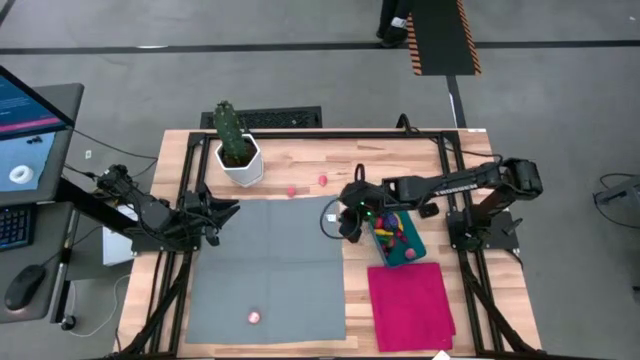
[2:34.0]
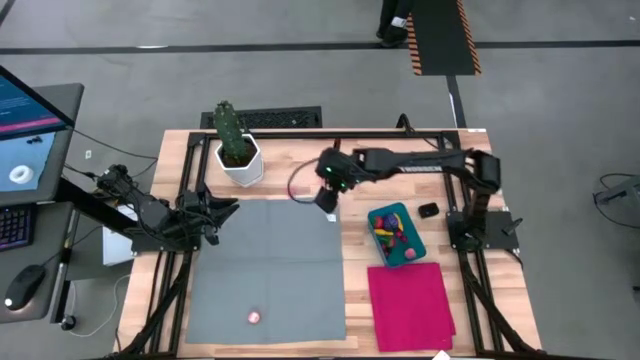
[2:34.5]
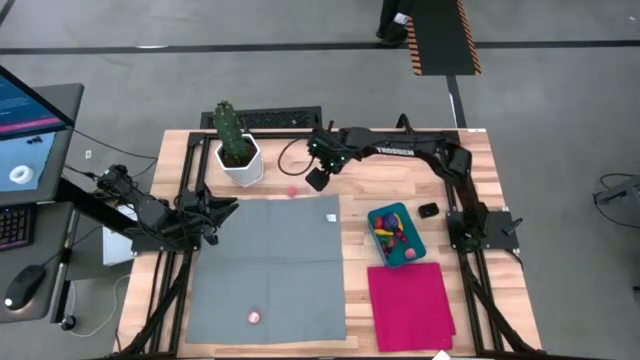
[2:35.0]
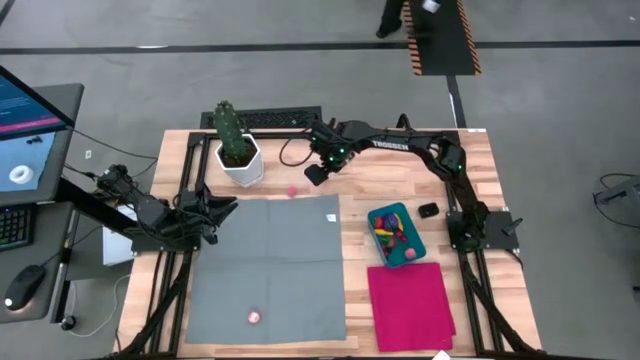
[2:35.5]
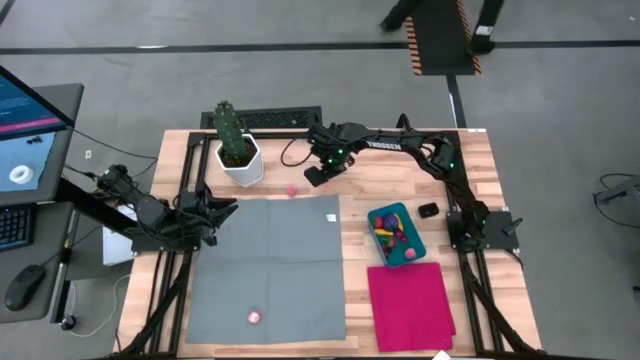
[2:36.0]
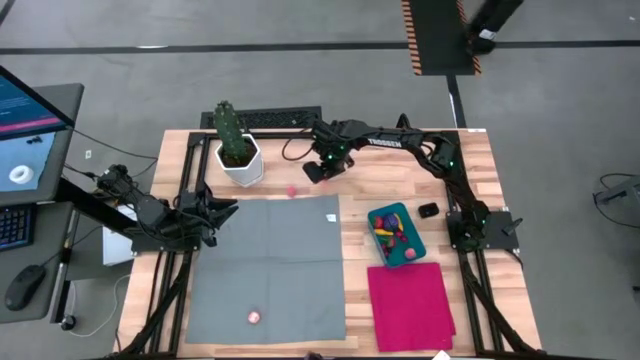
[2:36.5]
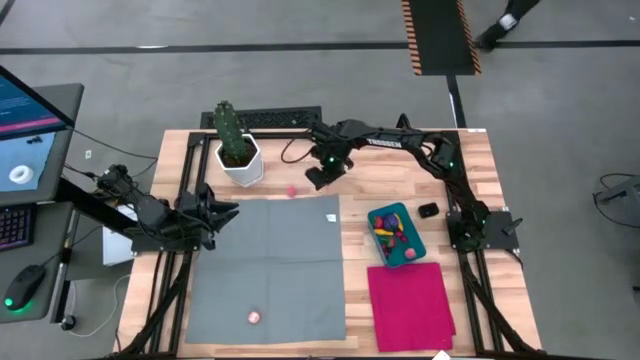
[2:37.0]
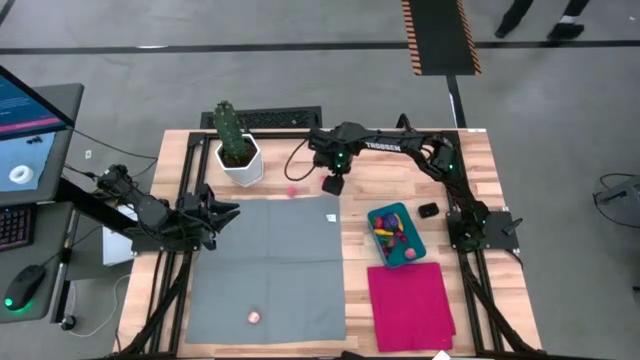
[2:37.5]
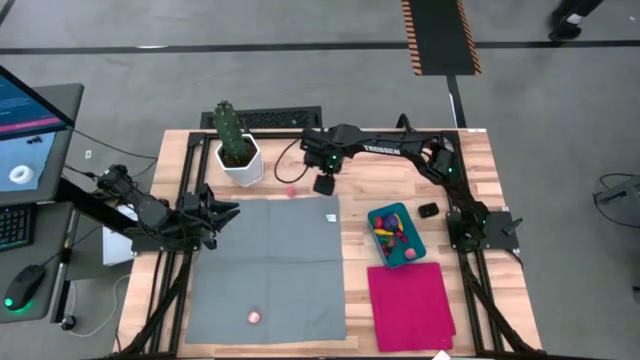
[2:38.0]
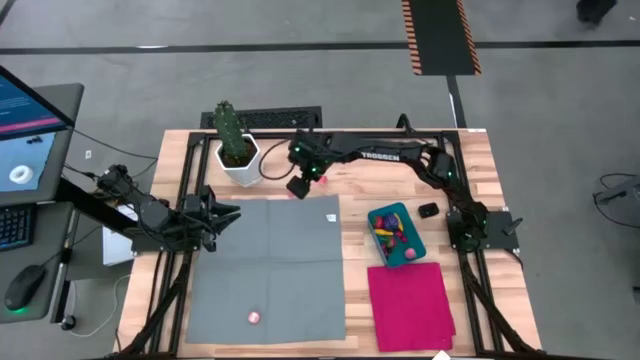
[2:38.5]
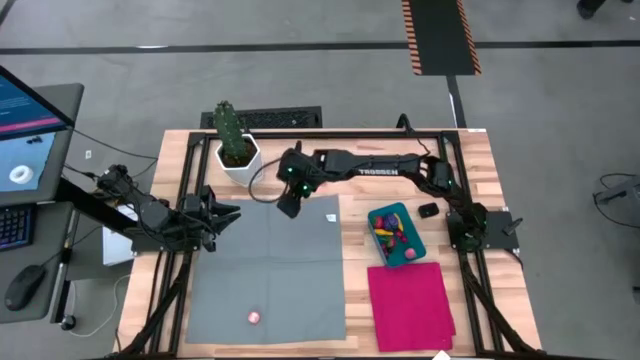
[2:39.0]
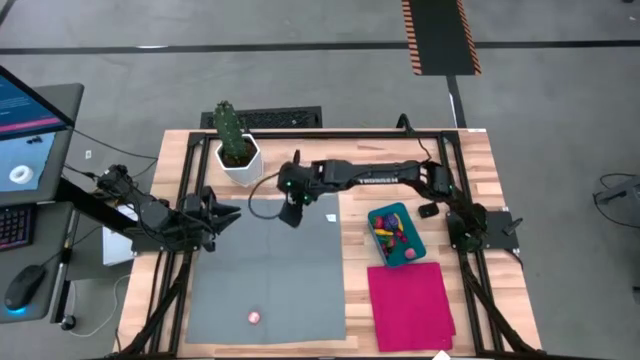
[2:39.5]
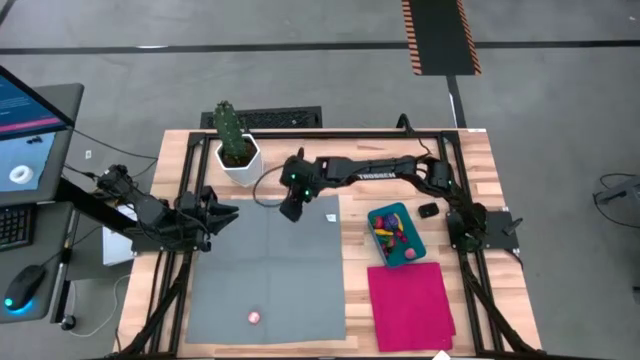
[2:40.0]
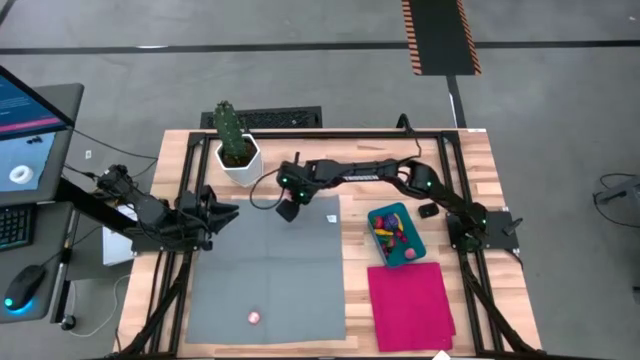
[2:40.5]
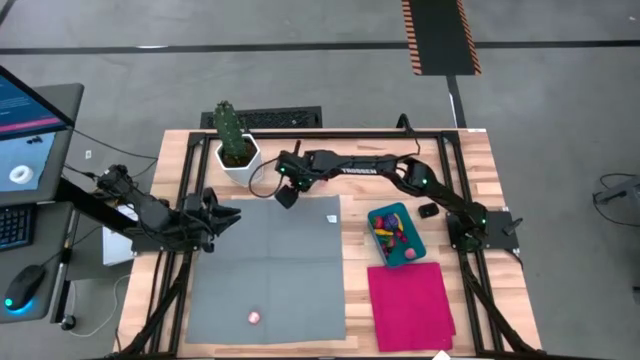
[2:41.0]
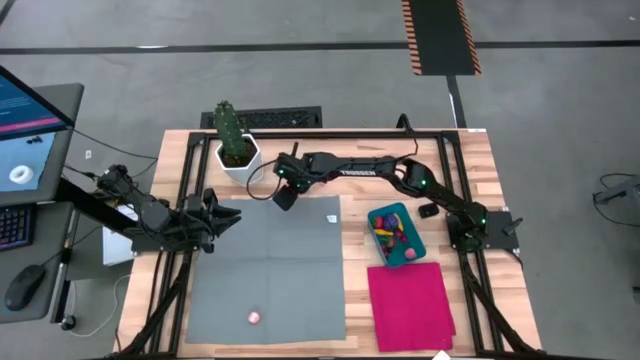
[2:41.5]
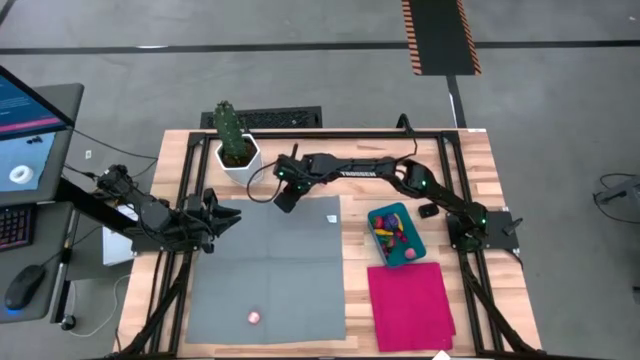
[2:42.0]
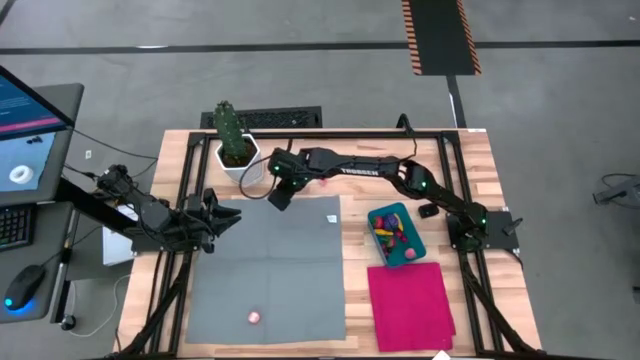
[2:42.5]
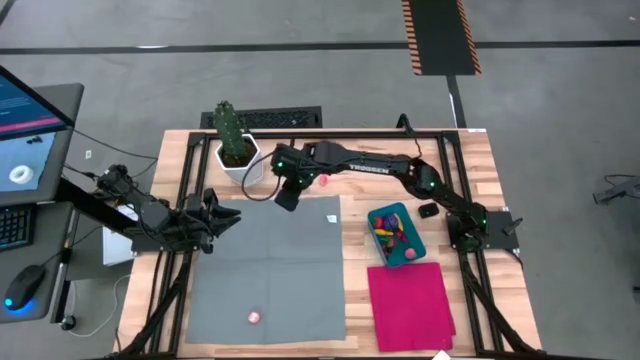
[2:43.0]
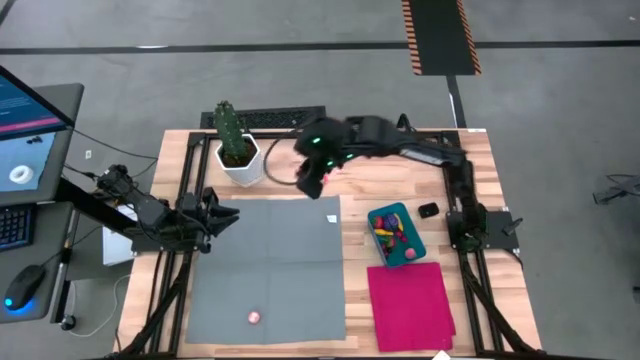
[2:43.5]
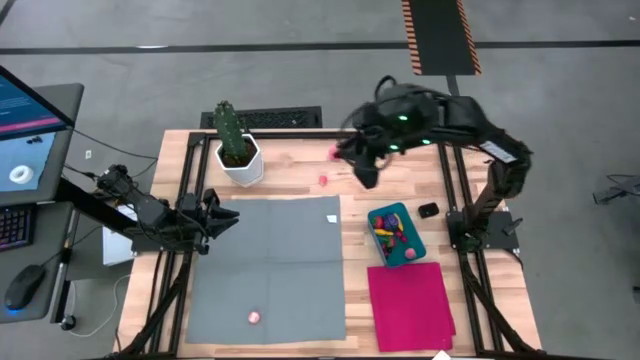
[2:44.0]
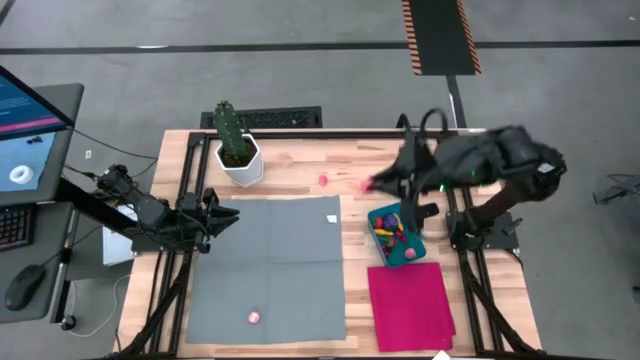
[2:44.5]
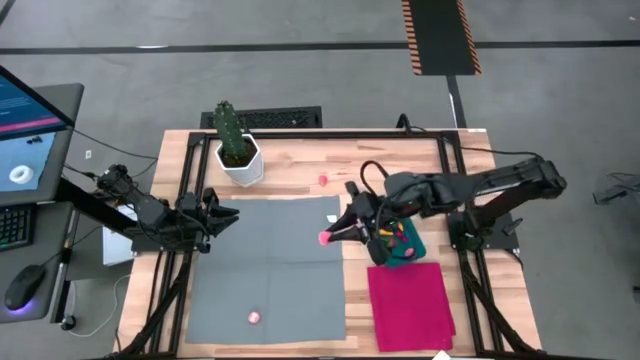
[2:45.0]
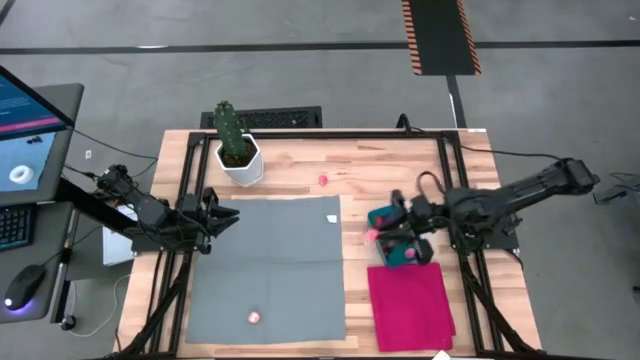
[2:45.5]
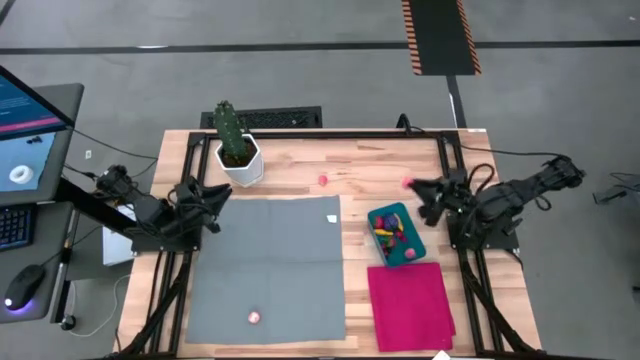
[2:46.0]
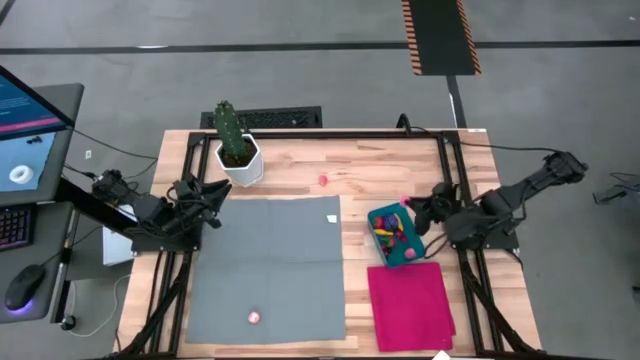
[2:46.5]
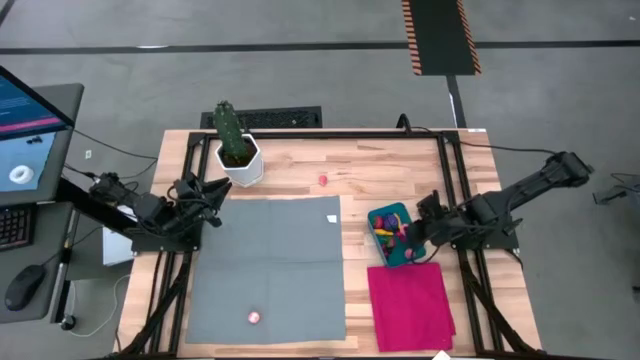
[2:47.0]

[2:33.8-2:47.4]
Task: Pick and placing Produce into tupperware
Put the pink peach into the blue bin

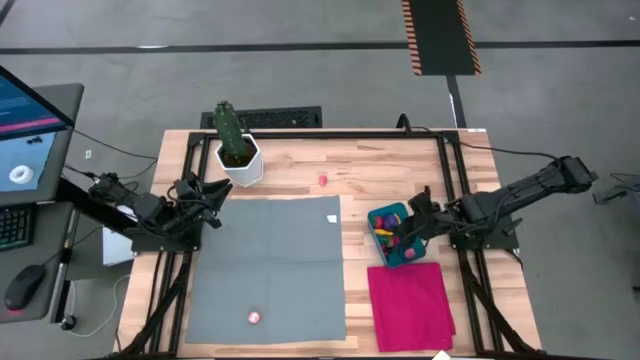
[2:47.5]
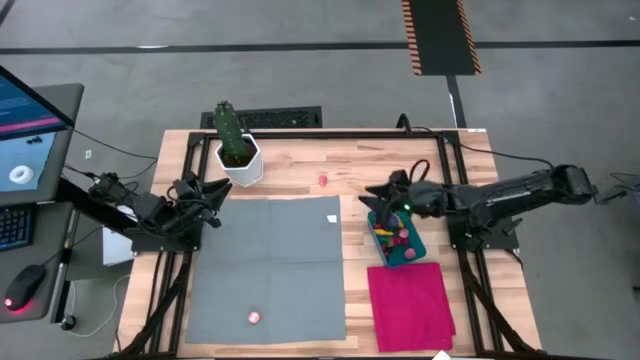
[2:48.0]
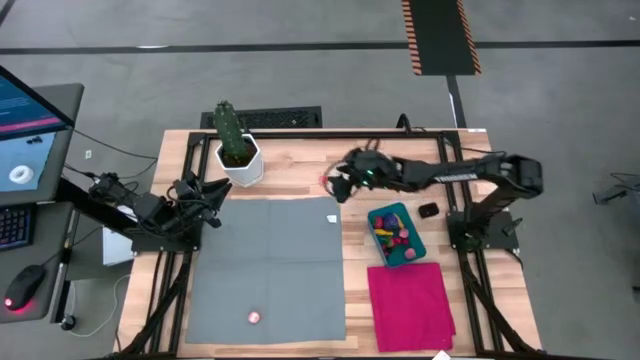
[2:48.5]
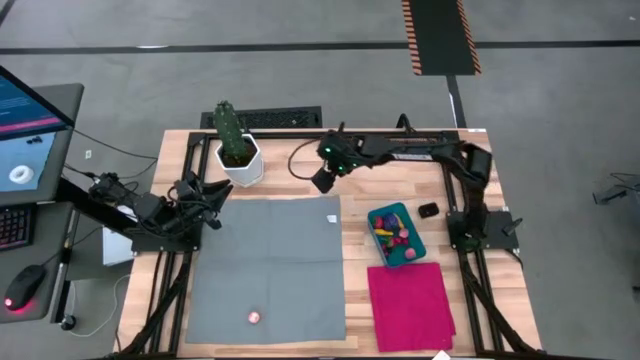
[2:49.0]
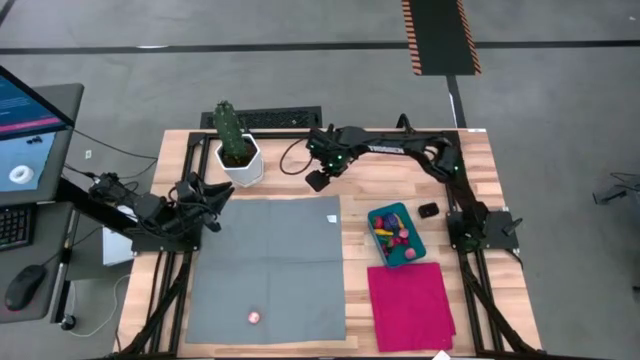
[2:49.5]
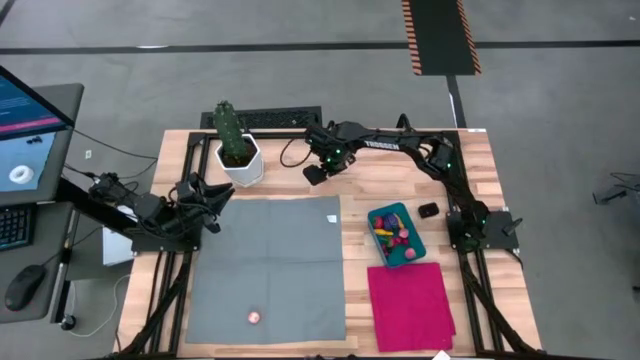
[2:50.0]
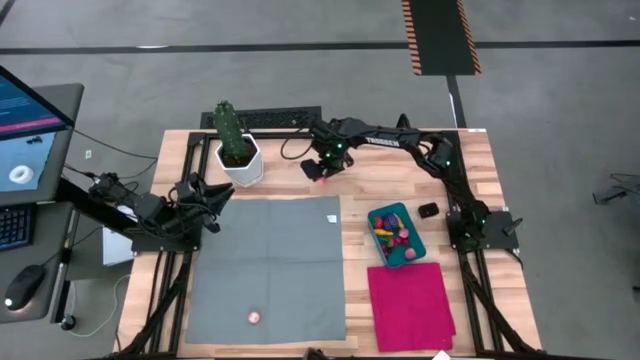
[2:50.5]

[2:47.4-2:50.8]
Put the pink peach into the blue bin

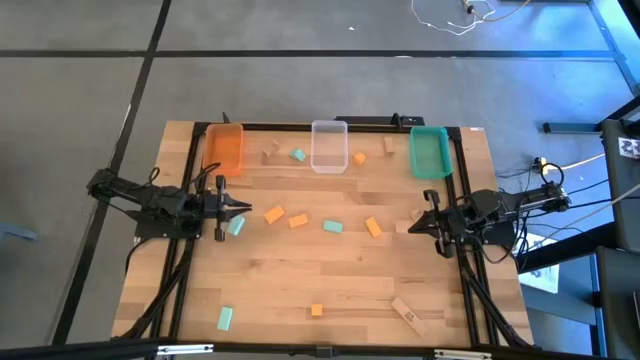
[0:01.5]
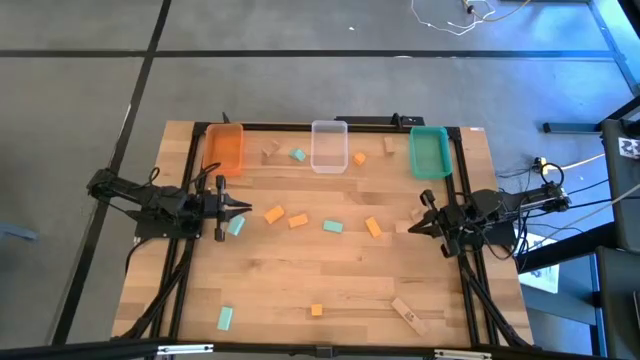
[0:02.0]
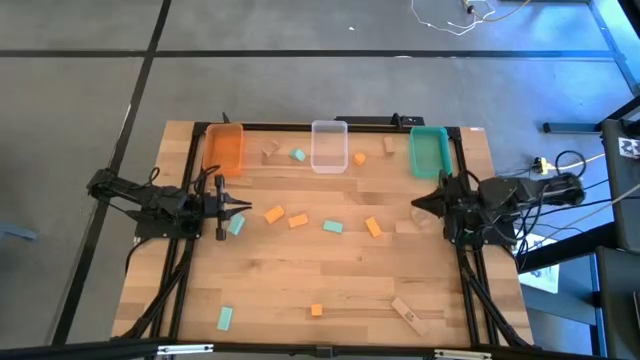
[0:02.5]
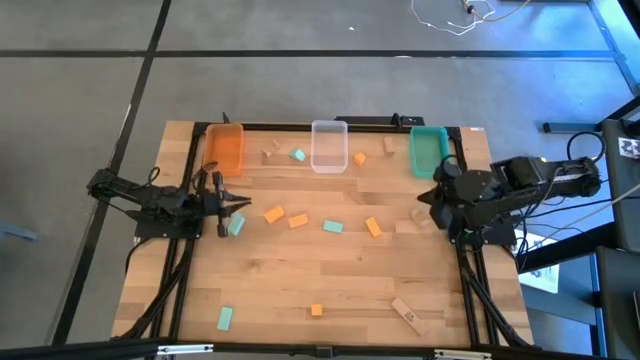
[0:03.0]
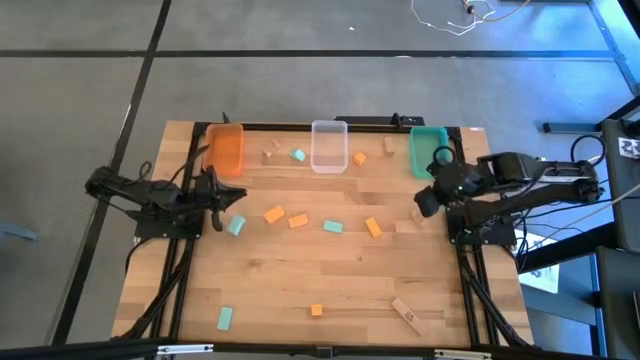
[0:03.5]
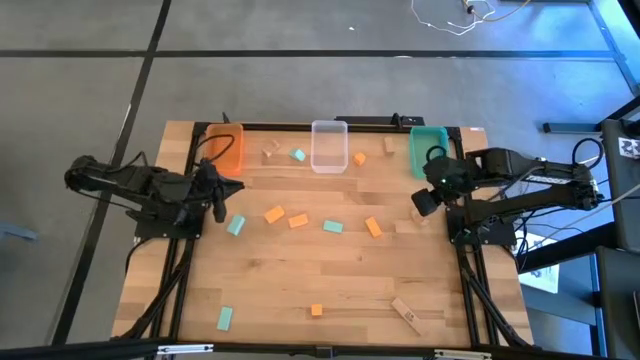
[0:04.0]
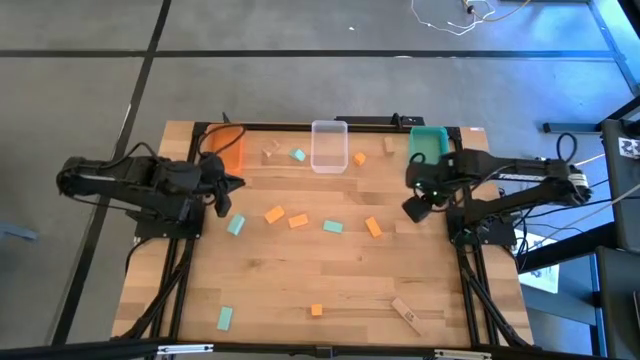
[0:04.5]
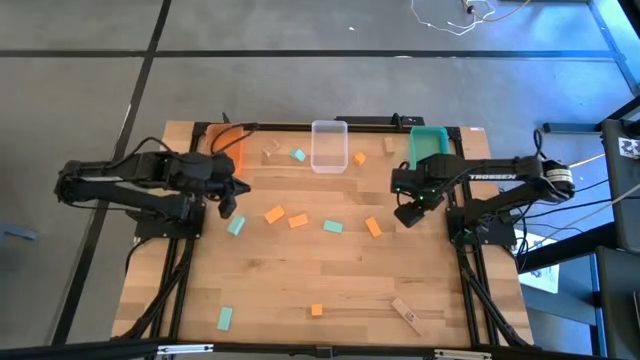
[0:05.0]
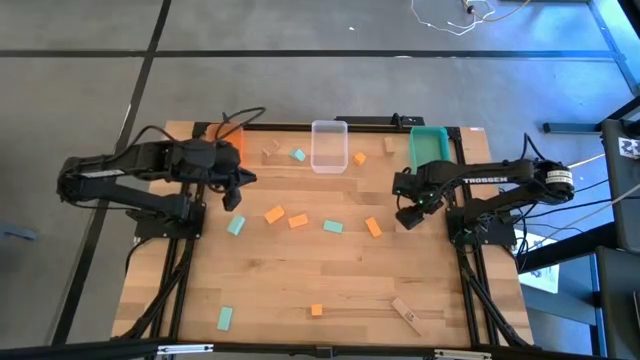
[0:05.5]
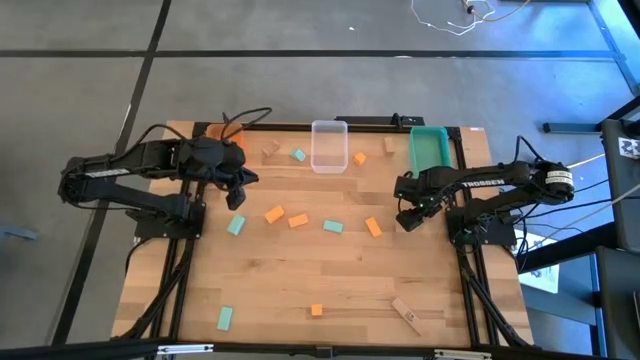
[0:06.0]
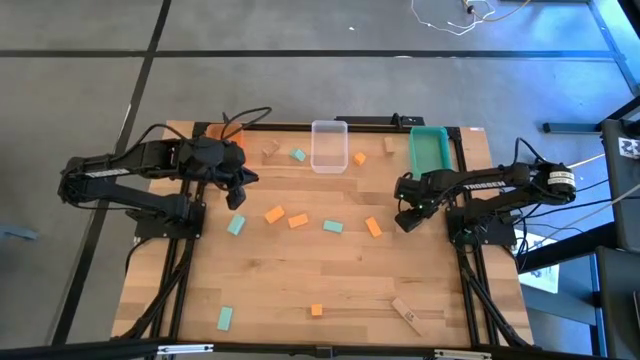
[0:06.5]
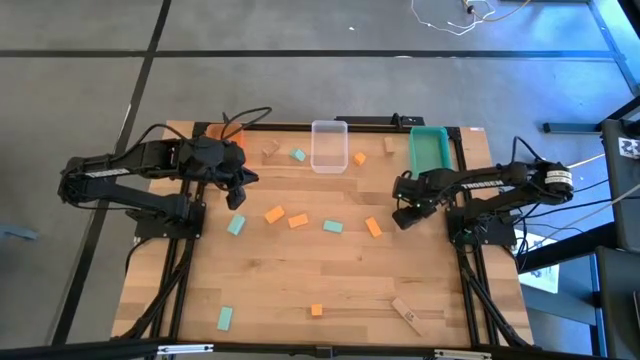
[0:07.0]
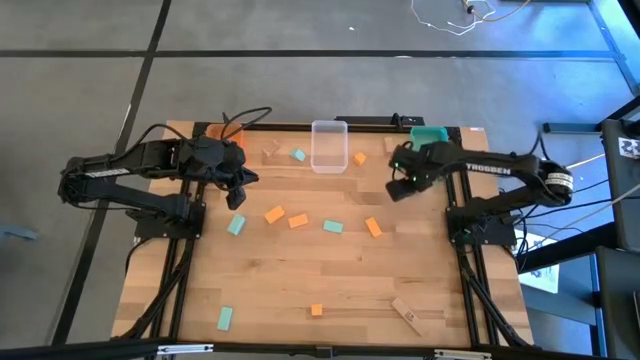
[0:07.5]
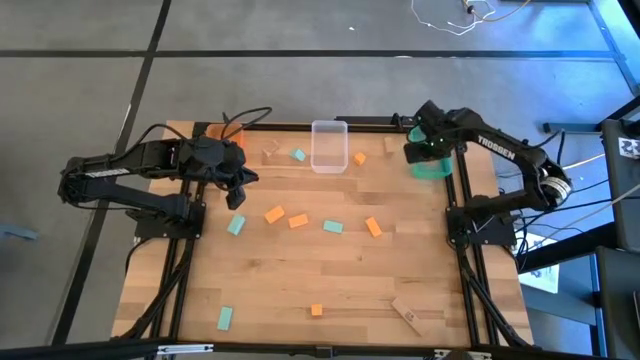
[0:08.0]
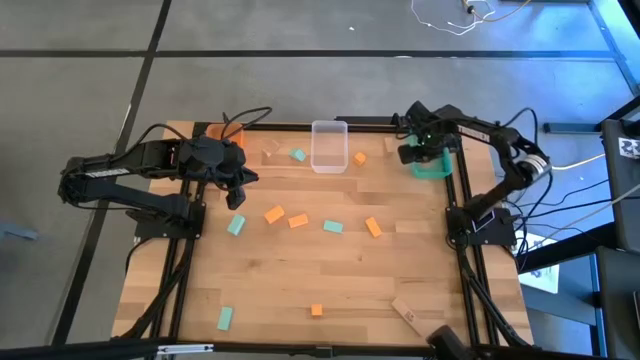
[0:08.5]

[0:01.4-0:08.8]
Task: Sort & place blocks by color
Put the brown block into the blue bin
